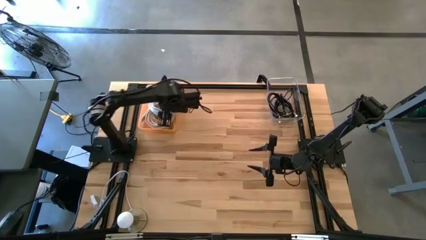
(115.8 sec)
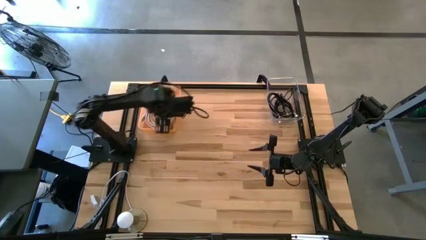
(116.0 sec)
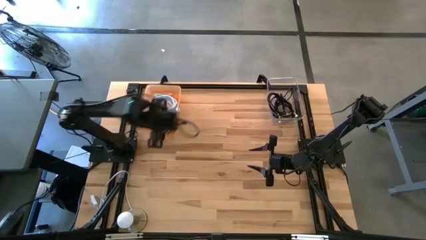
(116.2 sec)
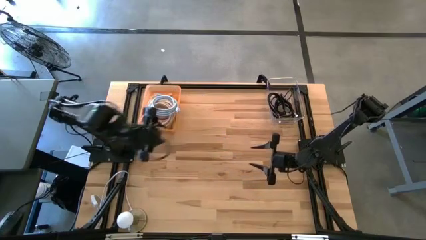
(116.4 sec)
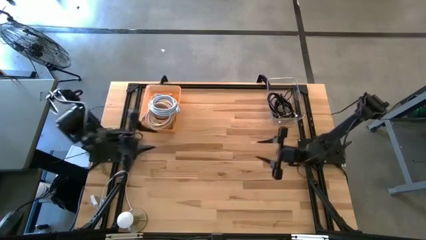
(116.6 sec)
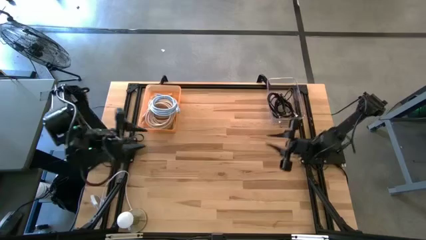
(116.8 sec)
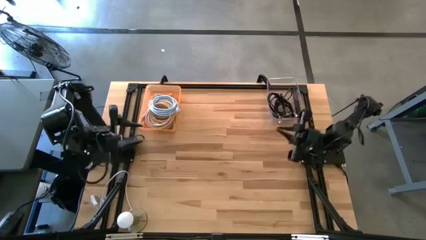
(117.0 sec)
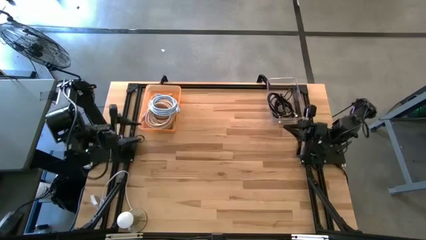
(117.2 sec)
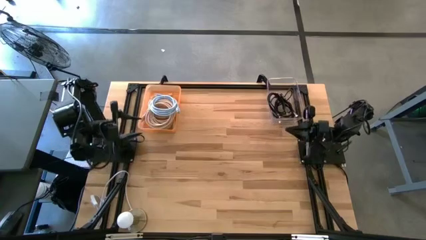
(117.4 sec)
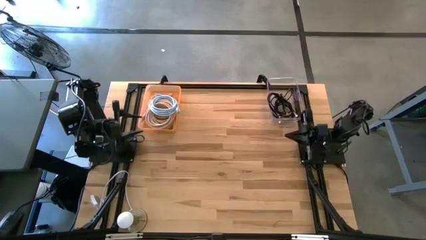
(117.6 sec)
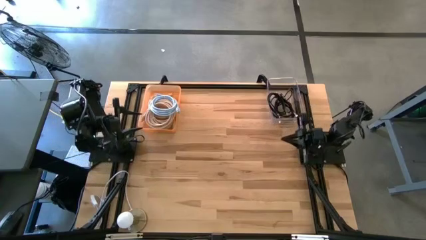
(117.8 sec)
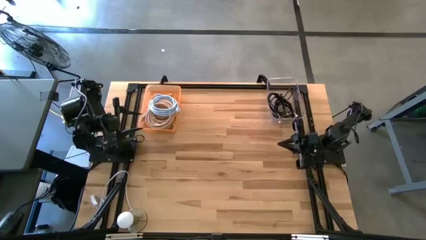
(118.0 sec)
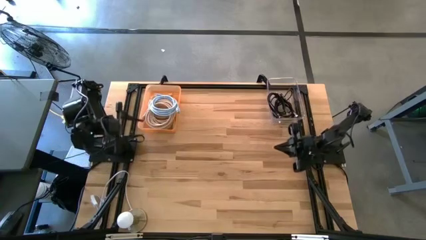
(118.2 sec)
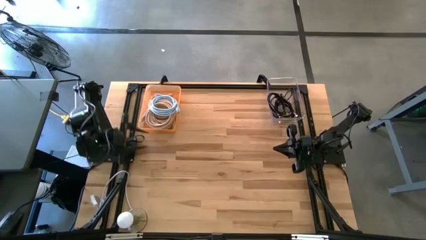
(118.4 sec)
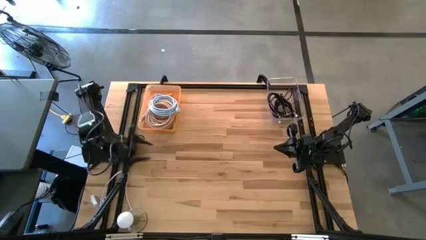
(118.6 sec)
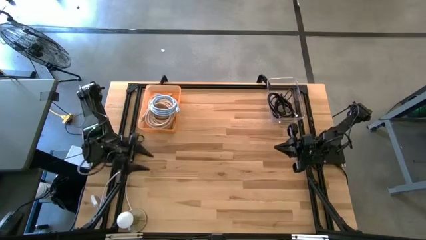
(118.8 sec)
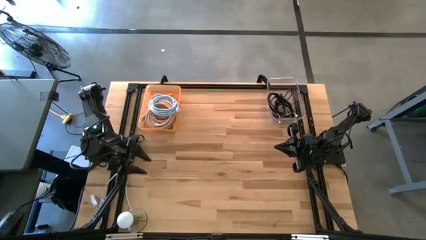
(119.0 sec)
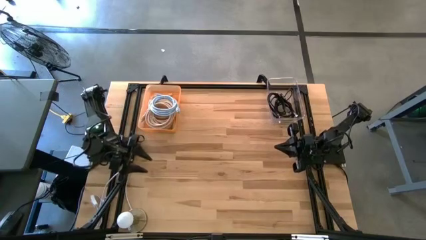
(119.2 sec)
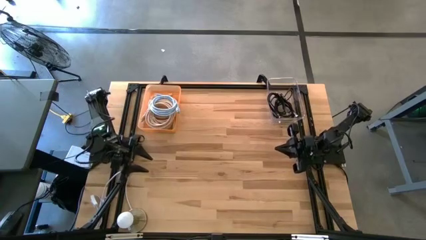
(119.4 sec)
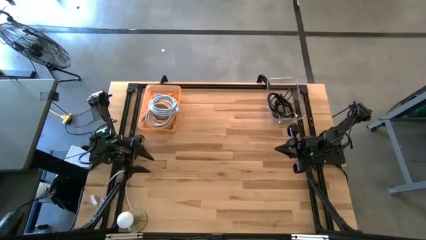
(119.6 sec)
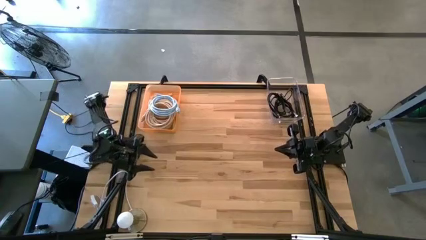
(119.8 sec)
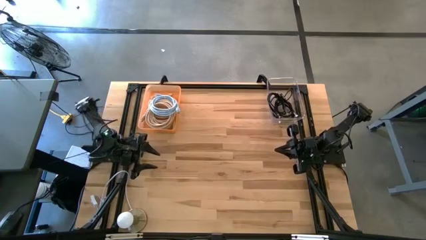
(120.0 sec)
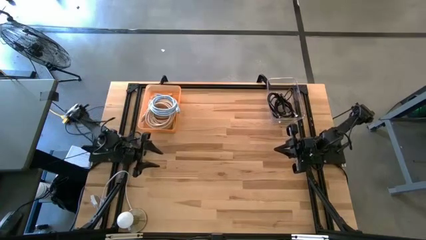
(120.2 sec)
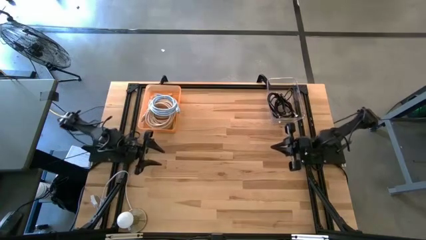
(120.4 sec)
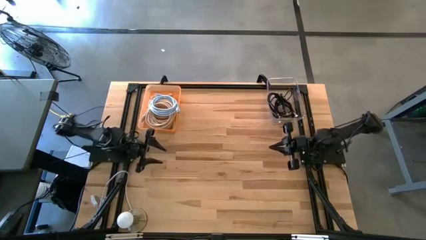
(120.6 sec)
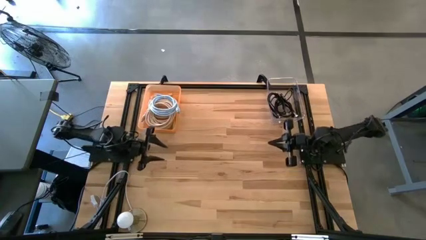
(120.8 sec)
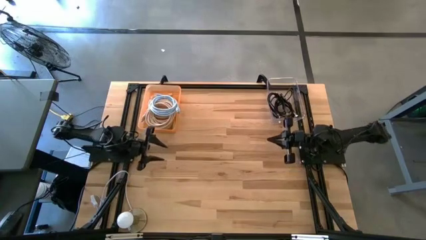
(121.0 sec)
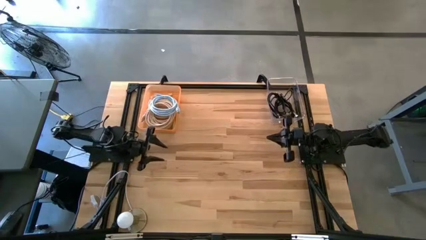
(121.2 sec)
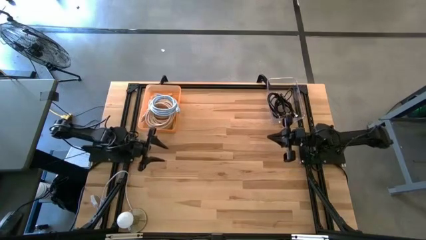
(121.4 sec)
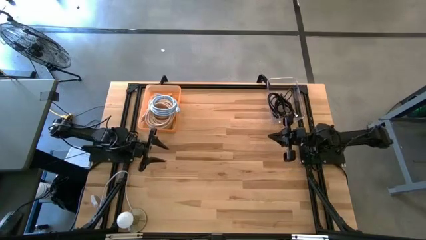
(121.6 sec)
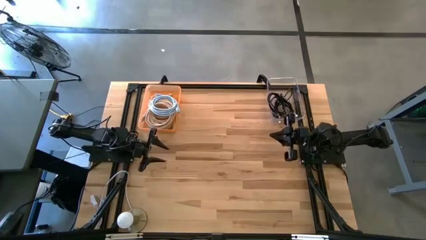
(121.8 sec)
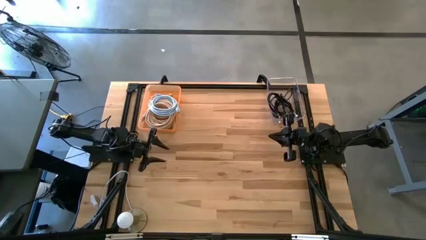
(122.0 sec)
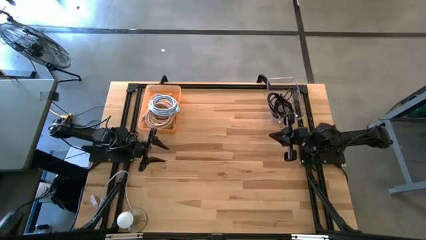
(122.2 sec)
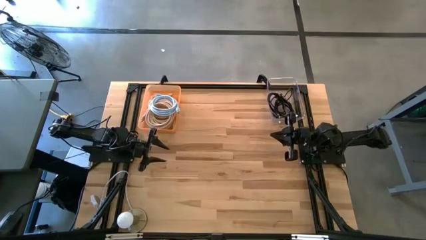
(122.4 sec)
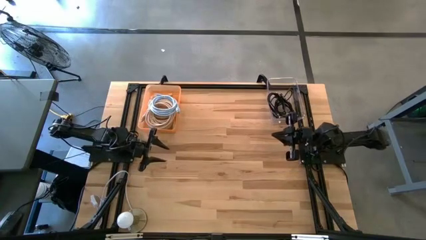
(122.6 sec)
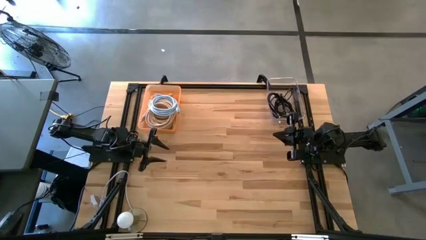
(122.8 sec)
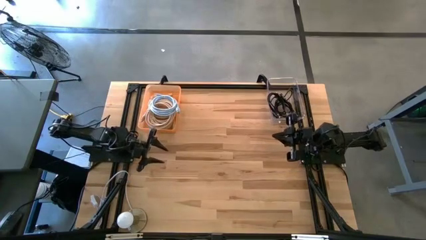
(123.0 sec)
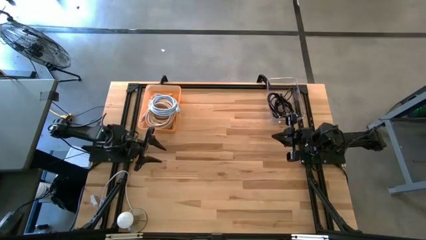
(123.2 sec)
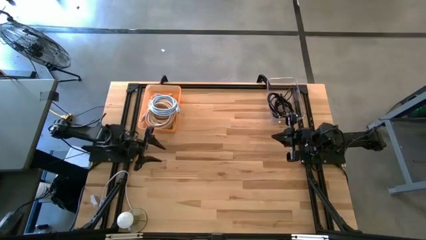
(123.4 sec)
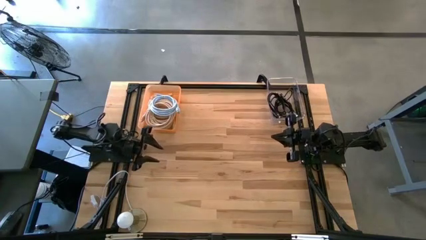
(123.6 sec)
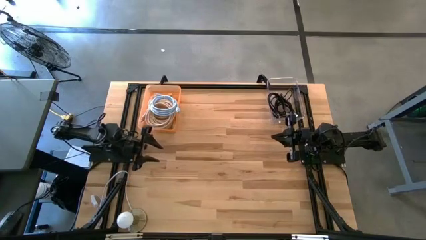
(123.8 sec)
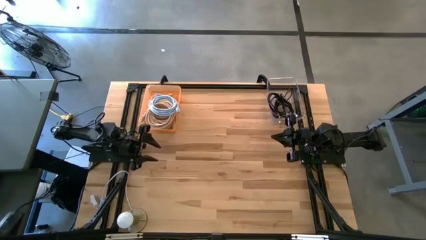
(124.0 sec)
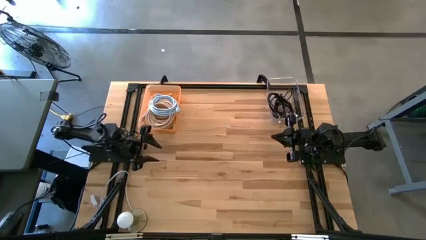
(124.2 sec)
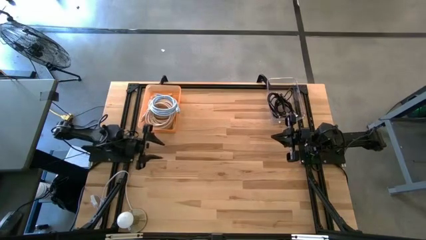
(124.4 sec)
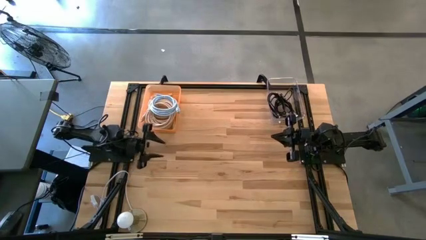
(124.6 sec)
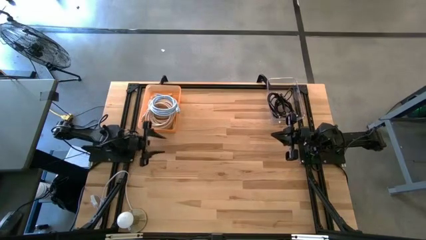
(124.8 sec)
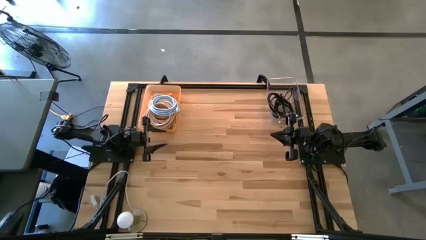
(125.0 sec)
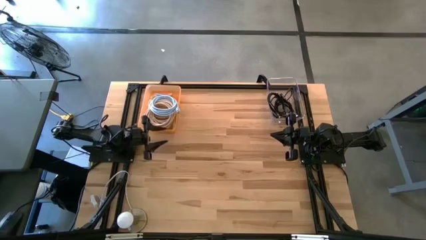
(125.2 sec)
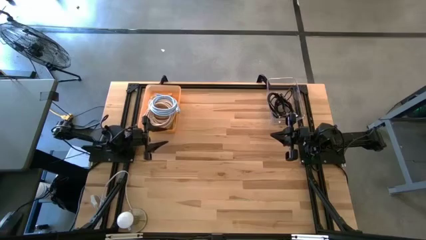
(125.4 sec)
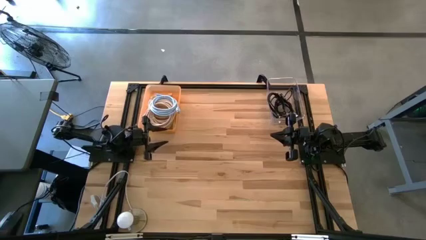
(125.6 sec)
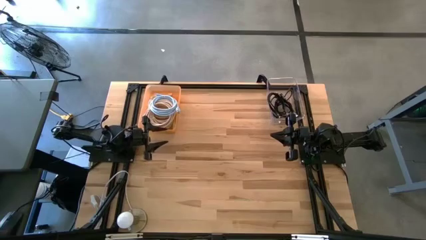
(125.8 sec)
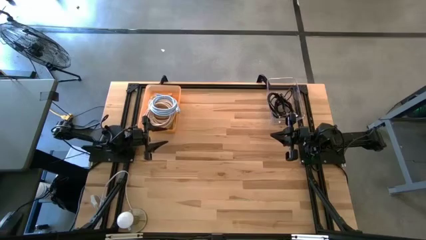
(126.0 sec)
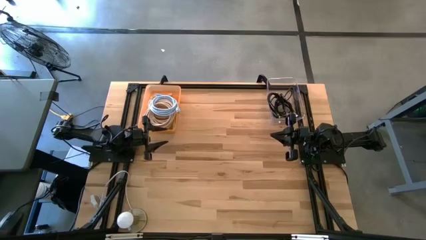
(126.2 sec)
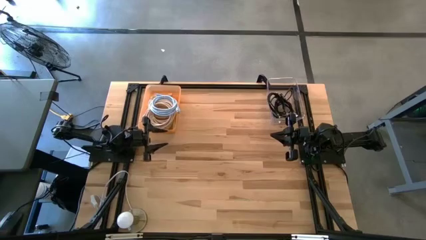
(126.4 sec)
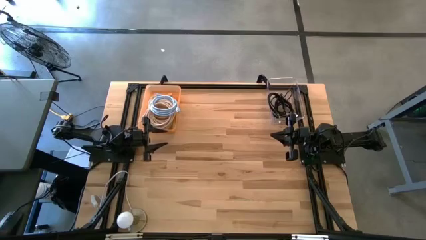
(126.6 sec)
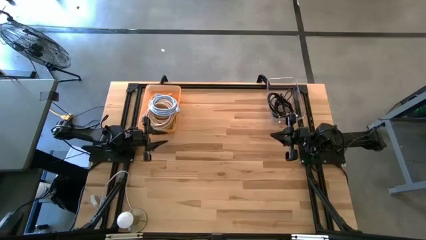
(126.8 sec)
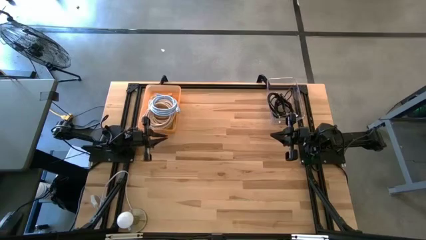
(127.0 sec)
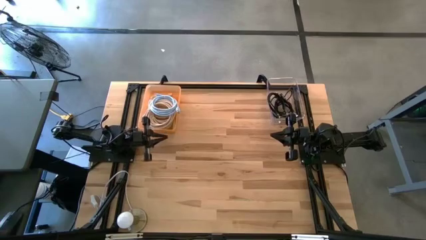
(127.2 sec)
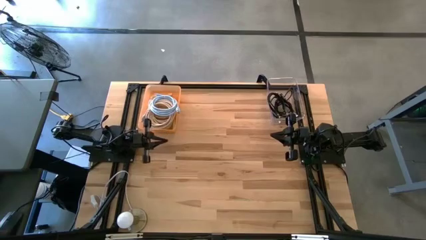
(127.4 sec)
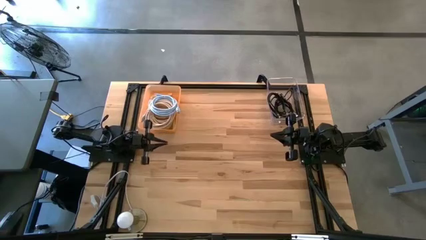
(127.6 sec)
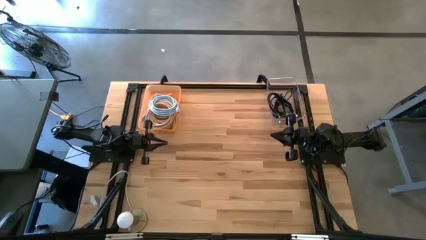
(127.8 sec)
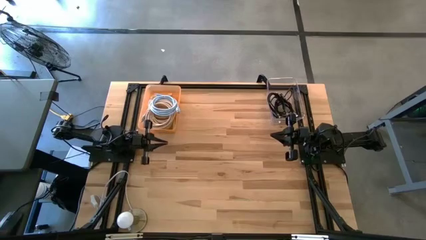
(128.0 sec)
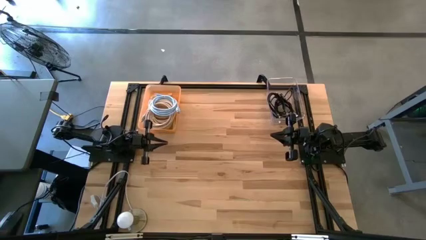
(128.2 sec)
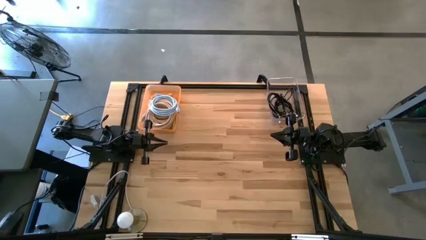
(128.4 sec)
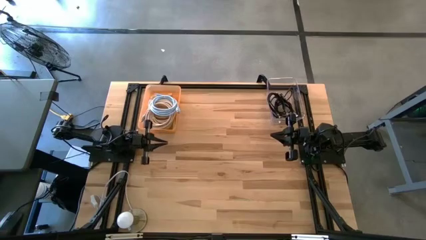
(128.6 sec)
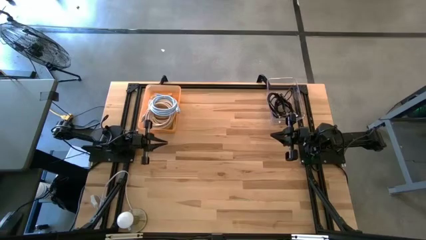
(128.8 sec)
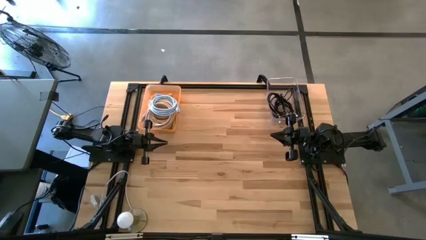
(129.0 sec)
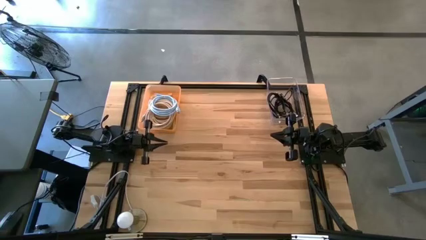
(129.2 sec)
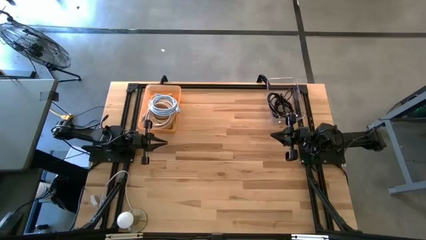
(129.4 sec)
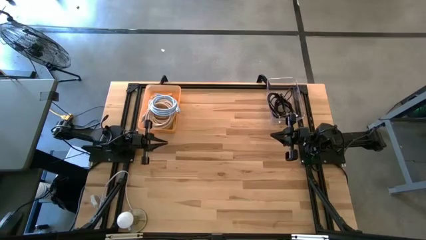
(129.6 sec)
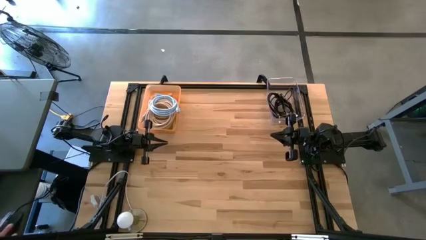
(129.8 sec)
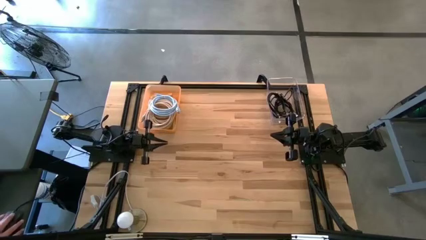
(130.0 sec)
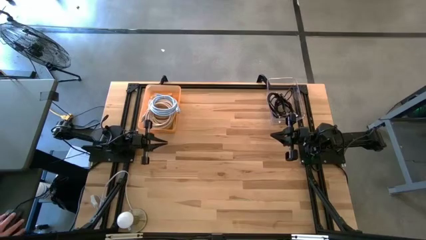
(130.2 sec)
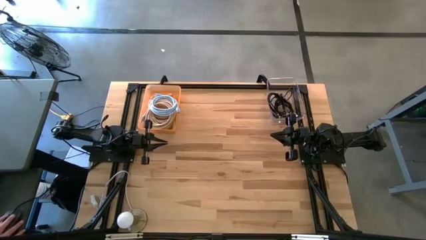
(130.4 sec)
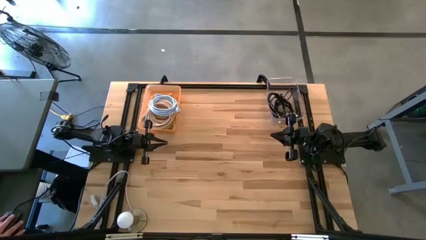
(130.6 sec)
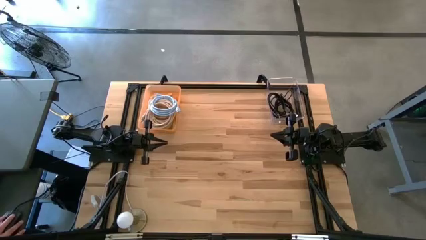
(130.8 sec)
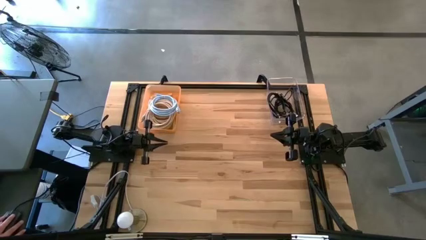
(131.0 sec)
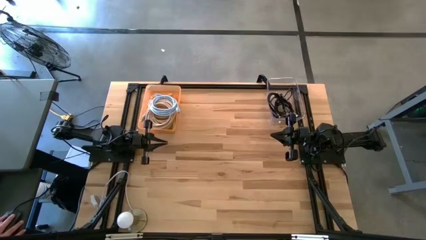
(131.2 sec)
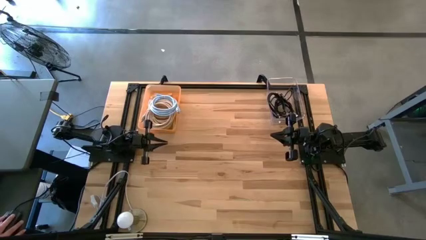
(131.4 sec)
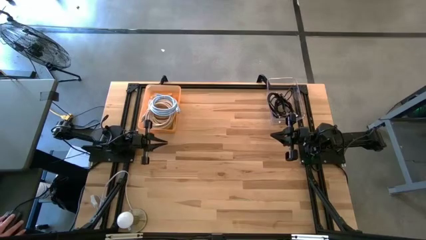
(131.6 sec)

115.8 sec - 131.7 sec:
Task: Sort HDMI cables
Return to Home Position
